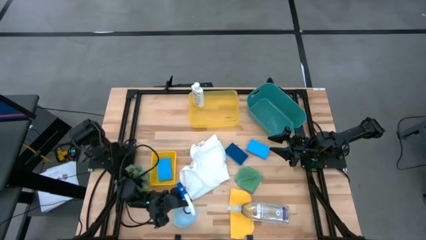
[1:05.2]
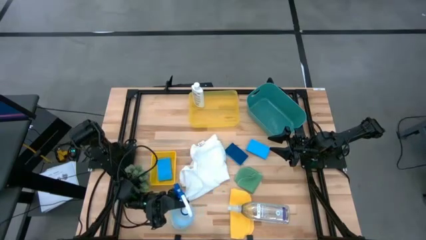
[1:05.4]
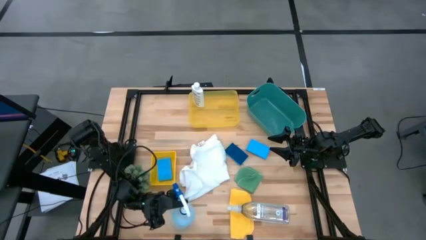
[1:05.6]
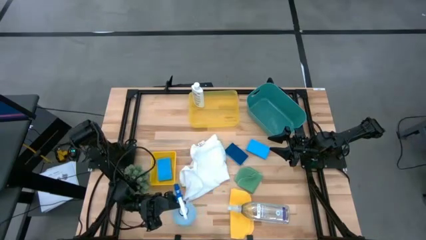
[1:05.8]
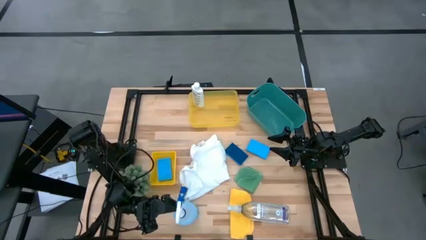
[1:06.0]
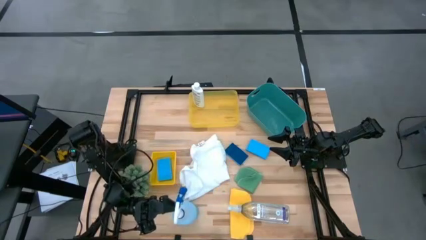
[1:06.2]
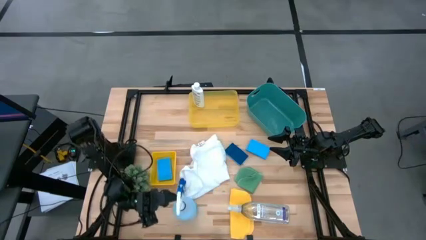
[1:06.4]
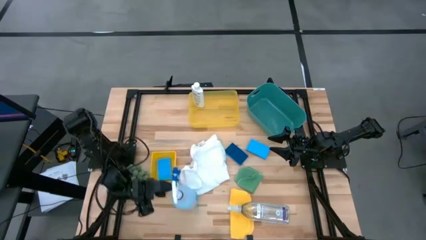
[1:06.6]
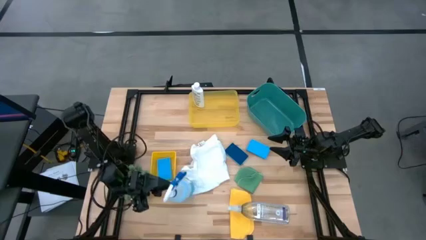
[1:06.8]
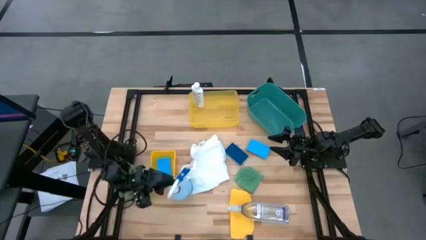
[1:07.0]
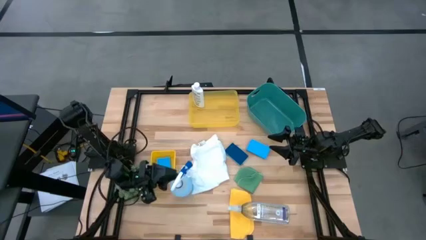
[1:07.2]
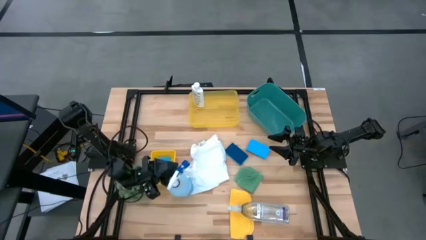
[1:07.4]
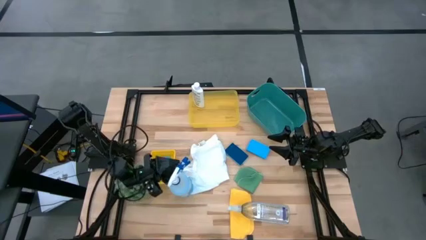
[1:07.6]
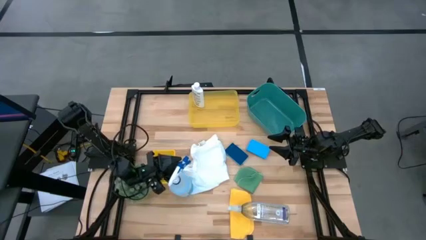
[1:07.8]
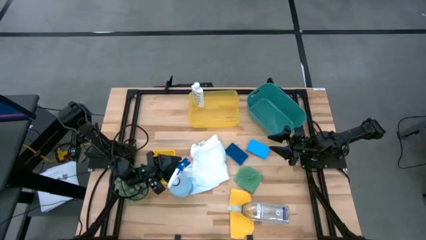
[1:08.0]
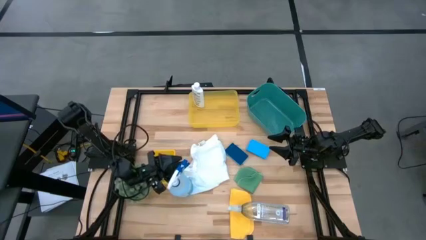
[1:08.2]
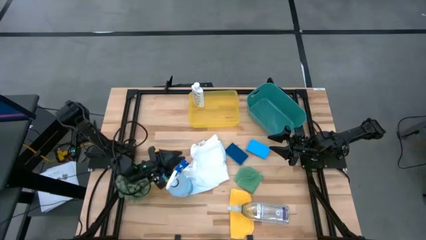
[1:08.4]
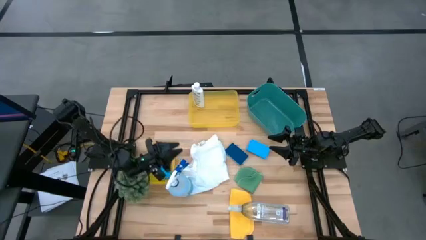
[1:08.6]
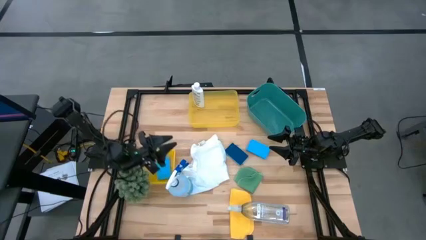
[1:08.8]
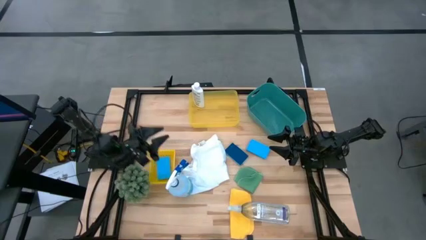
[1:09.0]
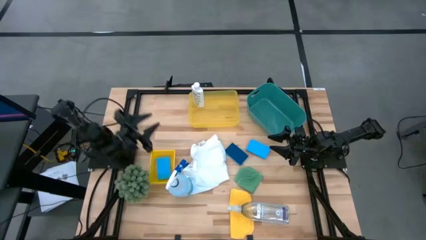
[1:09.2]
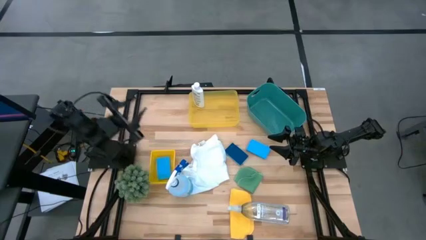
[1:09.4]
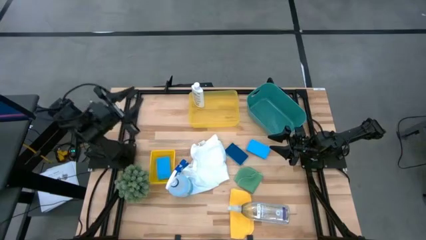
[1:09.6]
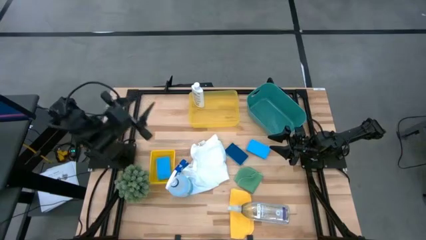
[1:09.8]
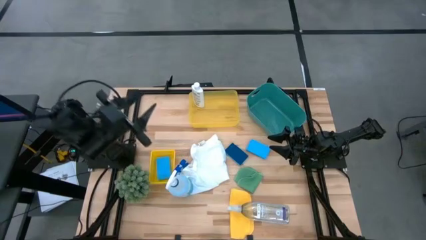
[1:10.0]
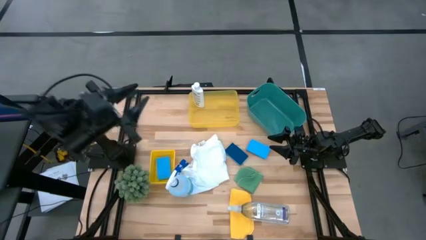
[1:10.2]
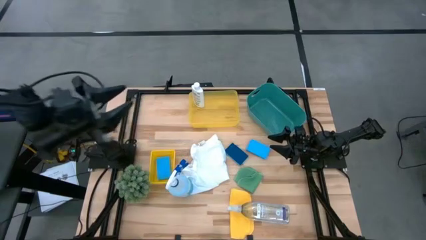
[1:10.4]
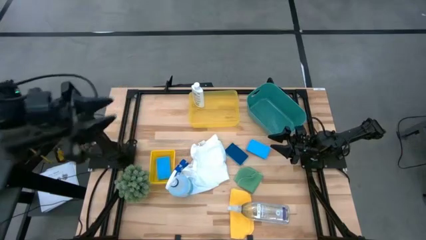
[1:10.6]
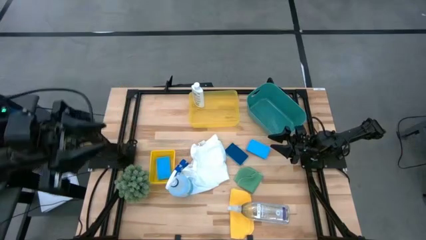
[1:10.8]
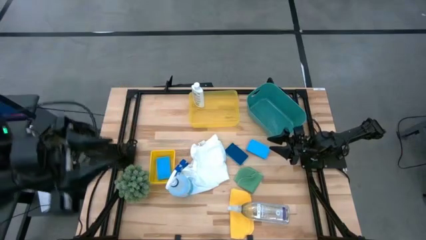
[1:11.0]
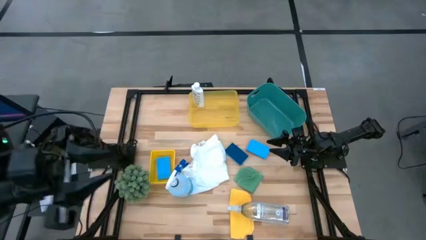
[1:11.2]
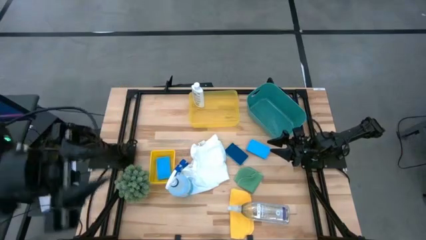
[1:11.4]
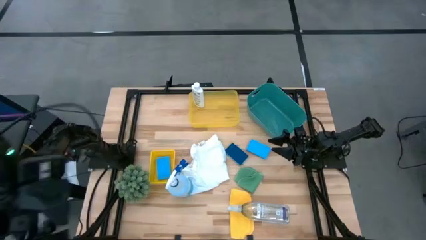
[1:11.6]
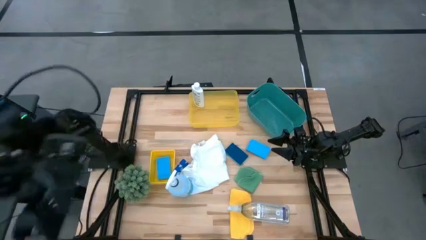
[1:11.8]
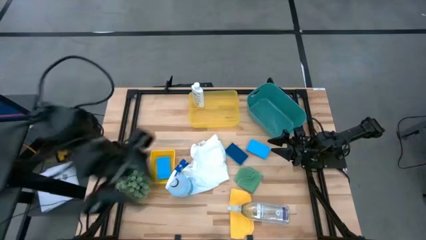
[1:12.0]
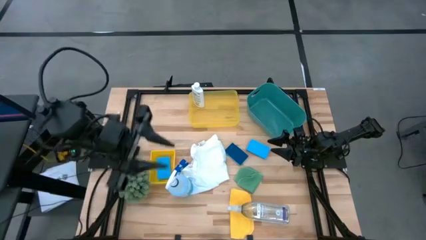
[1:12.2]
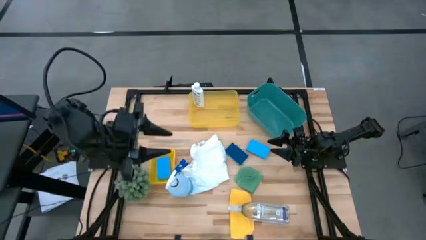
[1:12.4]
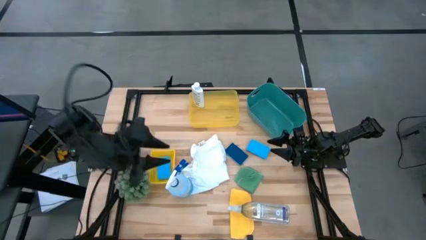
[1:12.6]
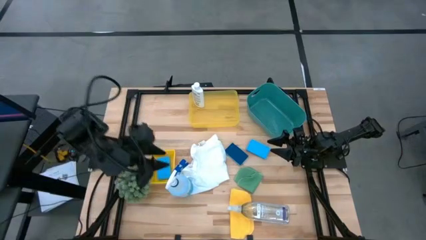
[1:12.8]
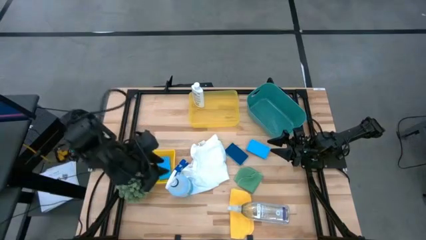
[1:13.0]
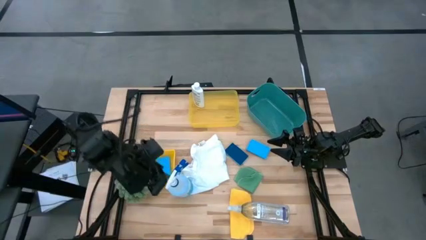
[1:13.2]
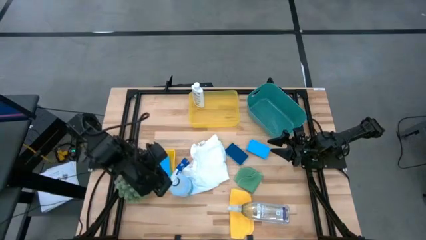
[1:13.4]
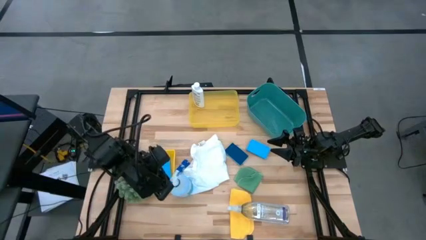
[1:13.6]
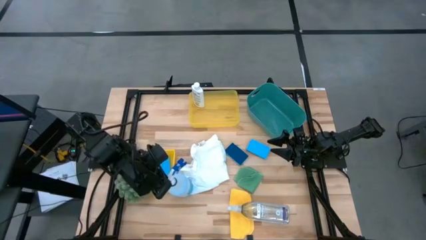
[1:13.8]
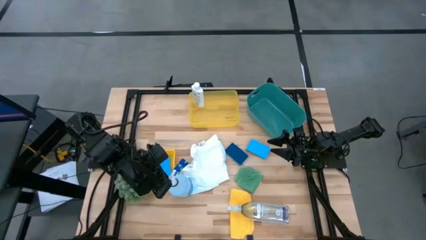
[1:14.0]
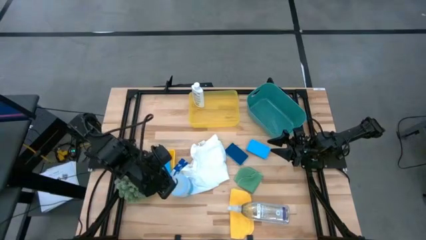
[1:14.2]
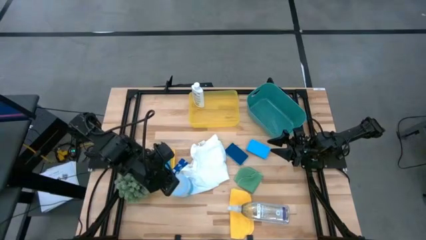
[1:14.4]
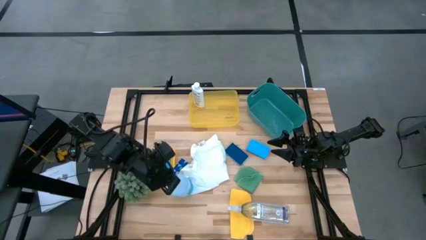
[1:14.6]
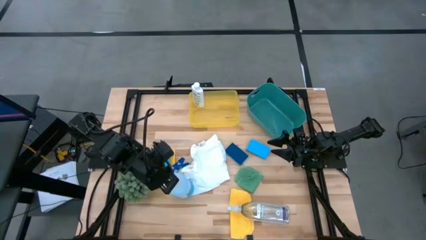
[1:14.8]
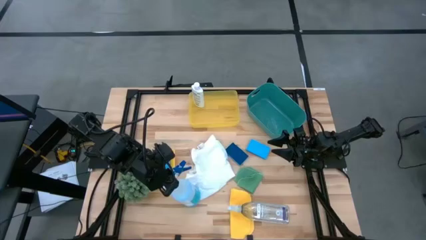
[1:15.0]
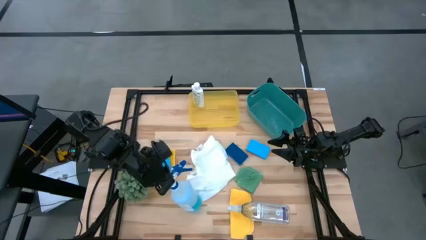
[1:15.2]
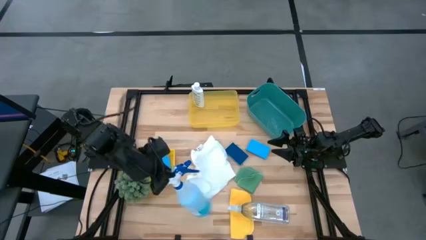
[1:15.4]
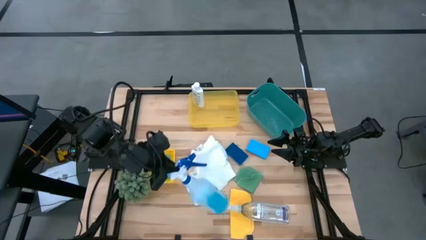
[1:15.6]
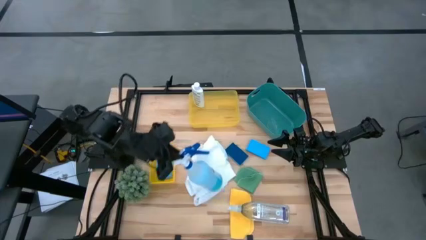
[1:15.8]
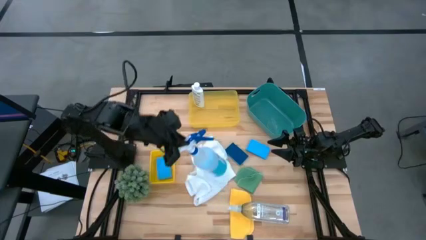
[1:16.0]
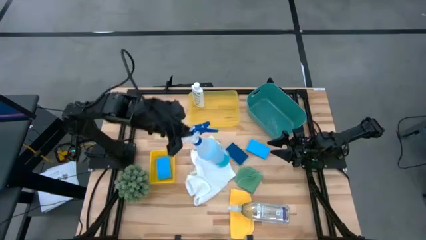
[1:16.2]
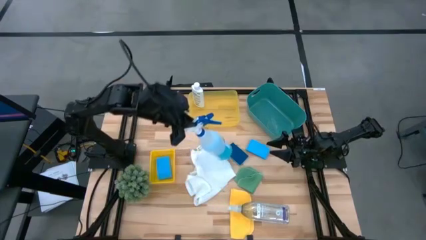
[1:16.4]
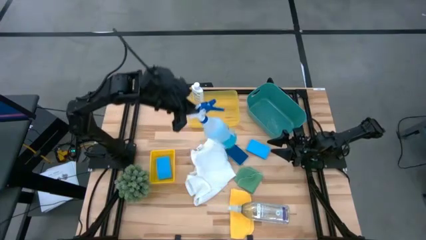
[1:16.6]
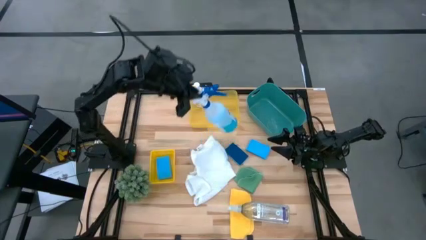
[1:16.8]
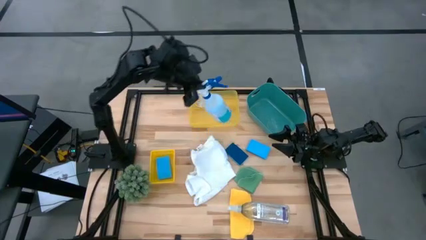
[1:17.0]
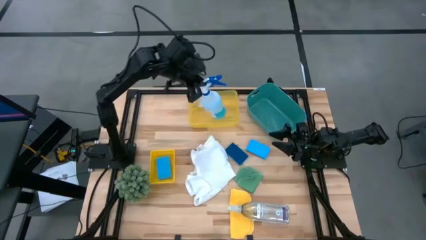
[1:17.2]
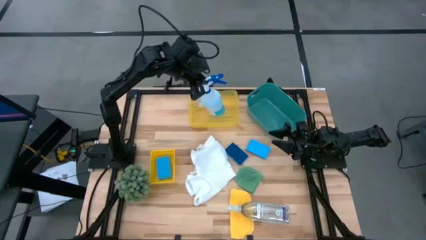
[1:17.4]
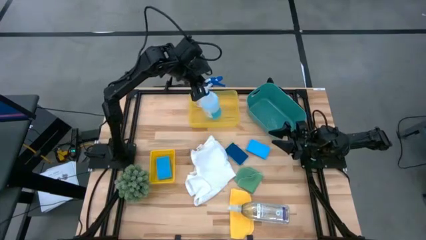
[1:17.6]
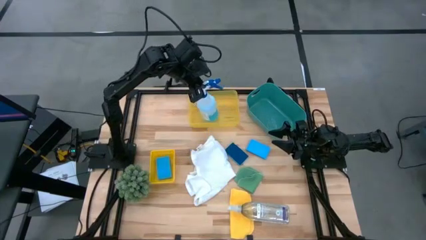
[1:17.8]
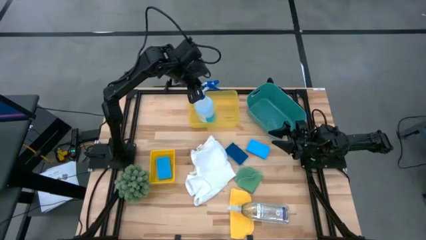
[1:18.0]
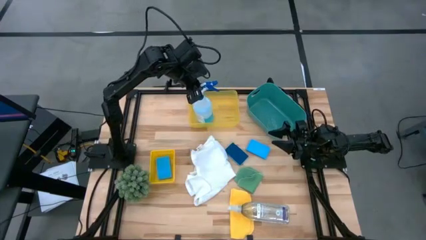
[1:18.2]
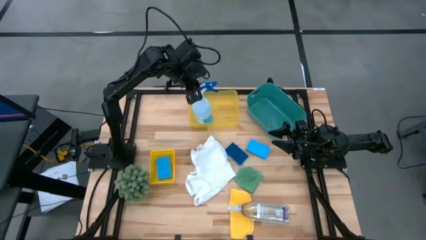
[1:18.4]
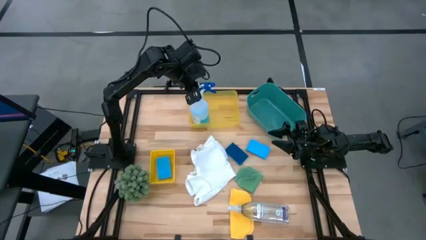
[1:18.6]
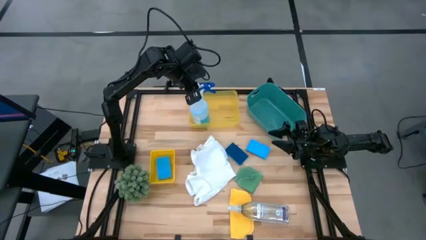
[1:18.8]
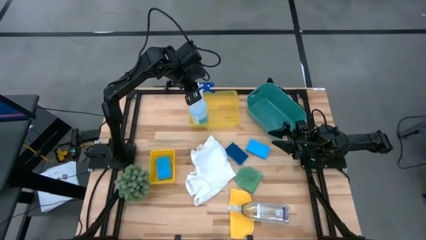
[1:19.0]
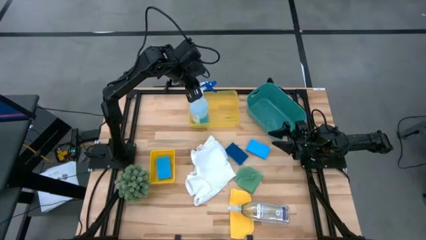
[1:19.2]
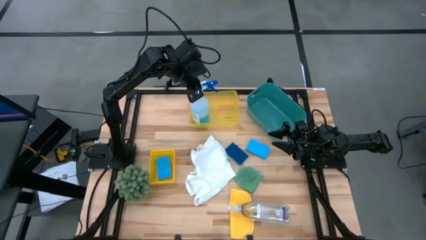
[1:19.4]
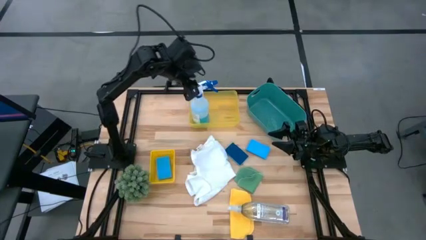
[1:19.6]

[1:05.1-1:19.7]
Task: Pick & Place Kitchen Items
Put the white spray bottle into the top yellow bin

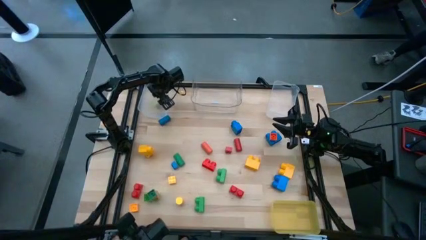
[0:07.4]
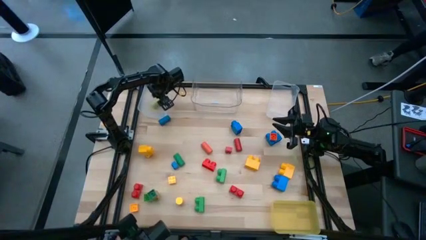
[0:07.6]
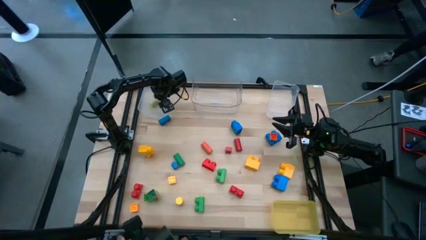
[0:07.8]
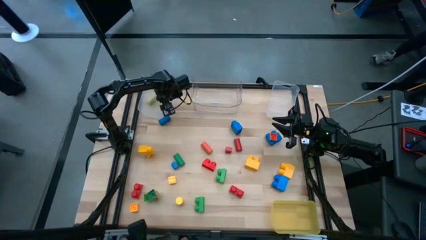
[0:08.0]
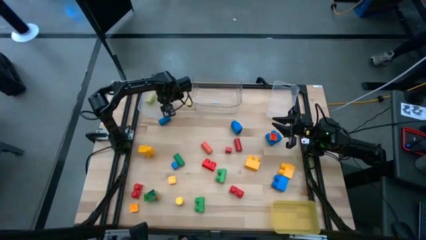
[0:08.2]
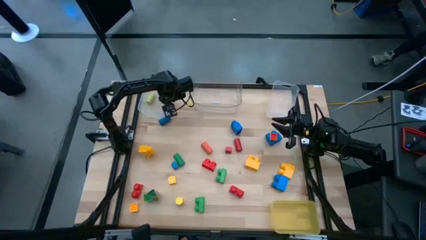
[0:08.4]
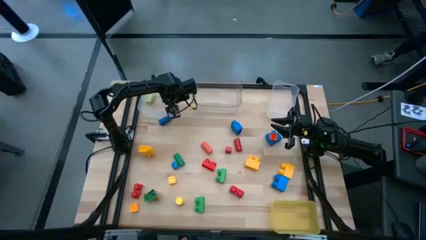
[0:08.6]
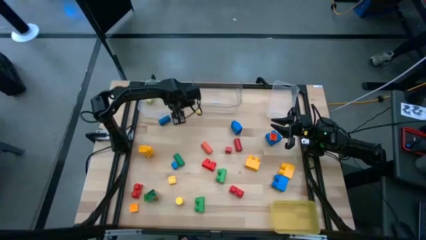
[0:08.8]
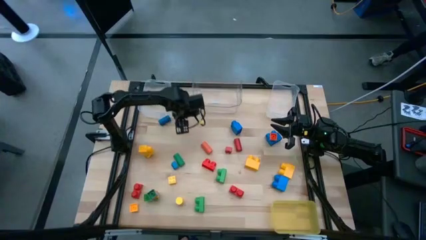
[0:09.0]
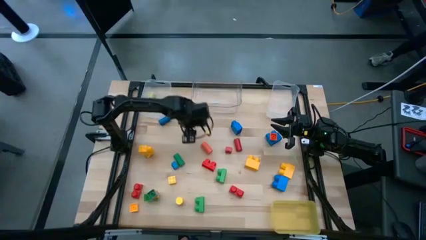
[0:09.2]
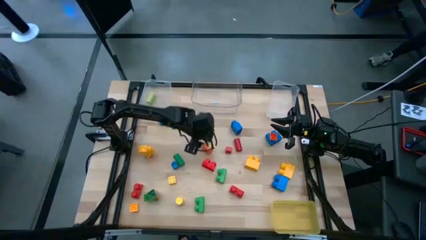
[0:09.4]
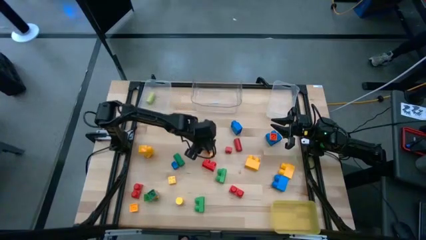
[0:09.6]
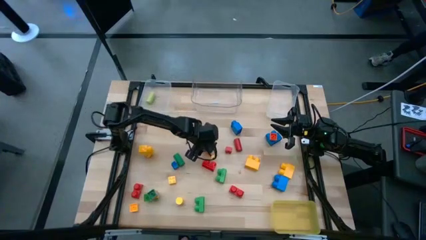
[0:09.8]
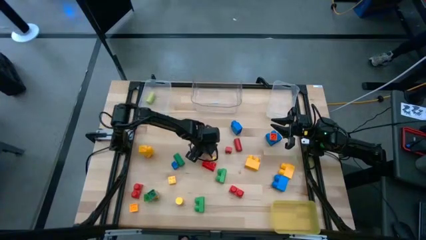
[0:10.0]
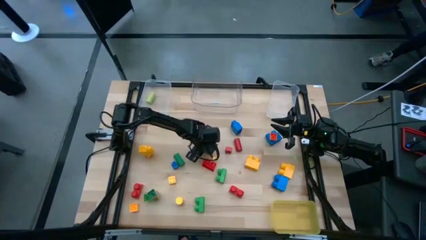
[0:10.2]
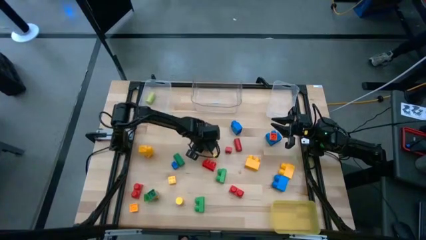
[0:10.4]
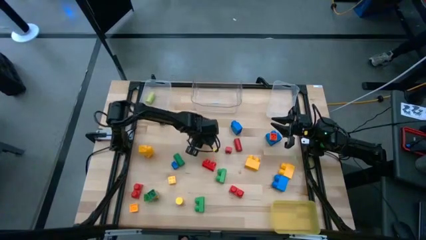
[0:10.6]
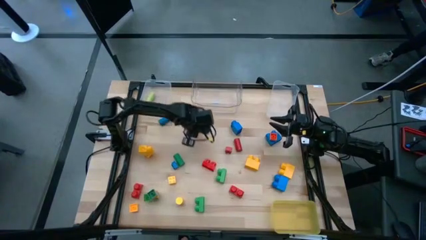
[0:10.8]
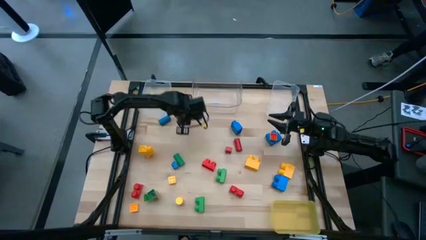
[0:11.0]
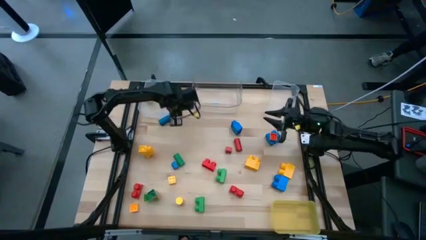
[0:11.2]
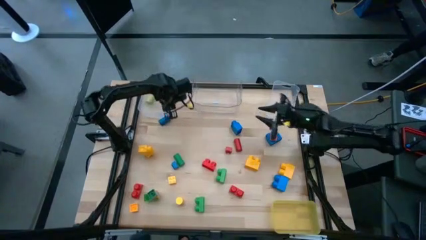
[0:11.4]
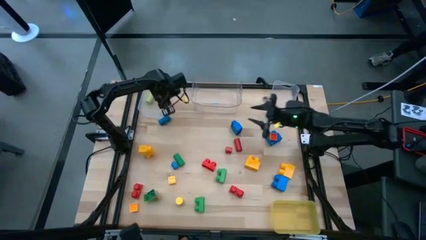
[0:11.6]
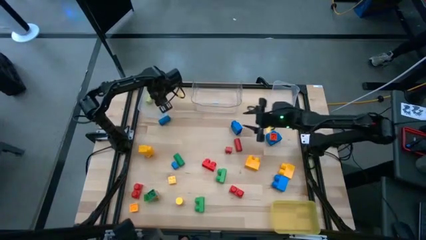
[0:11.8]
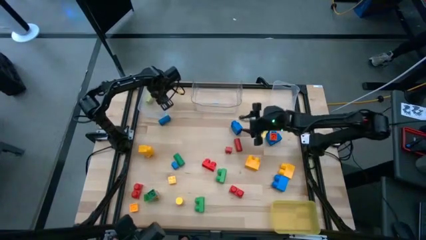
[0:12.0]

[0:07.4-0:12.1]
Task: Sort blocks by size
Put the orange cylindrical wooden block into the left transparent bin
